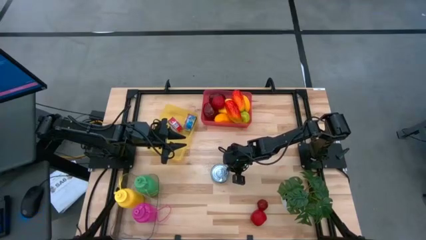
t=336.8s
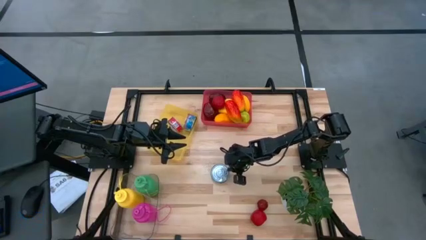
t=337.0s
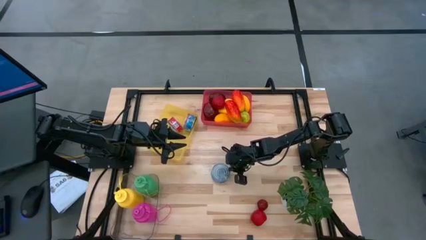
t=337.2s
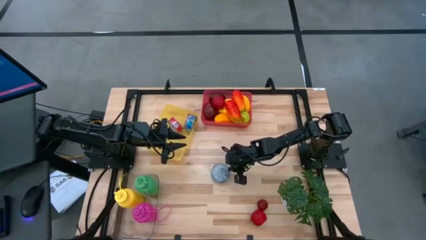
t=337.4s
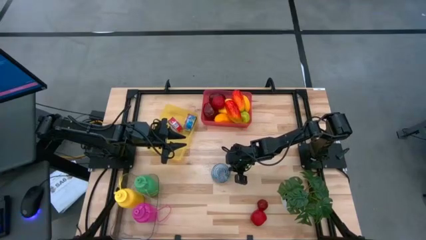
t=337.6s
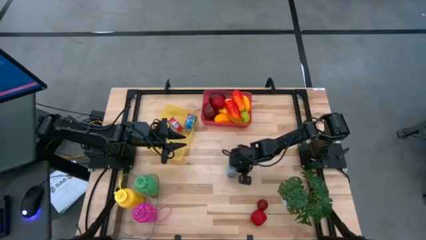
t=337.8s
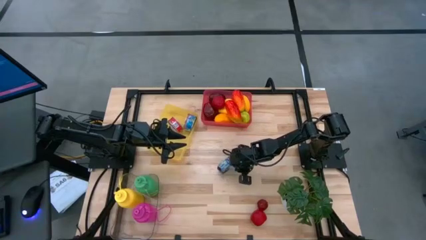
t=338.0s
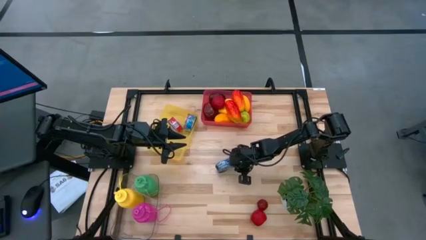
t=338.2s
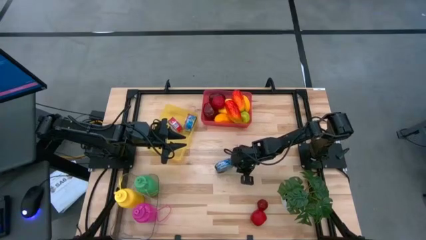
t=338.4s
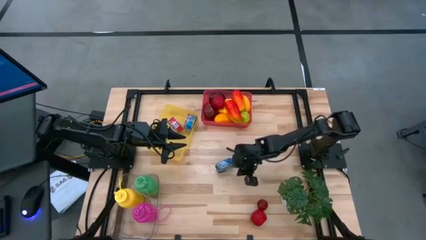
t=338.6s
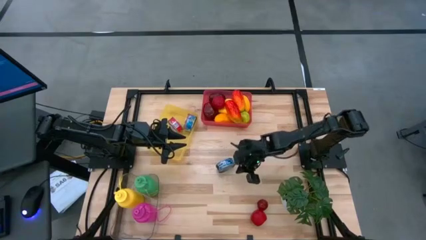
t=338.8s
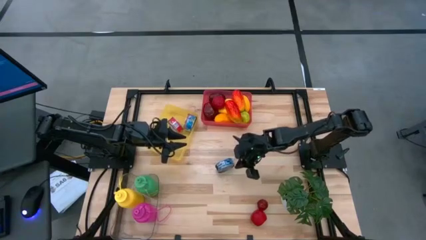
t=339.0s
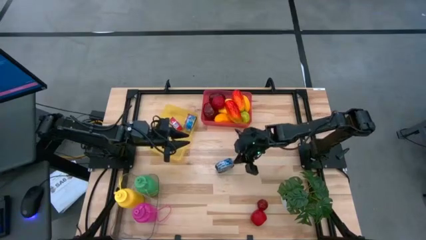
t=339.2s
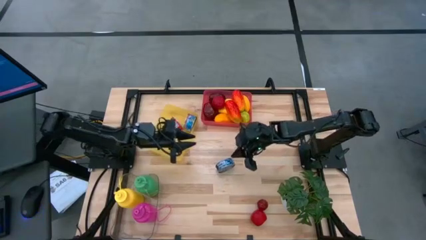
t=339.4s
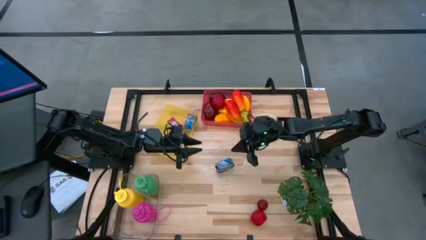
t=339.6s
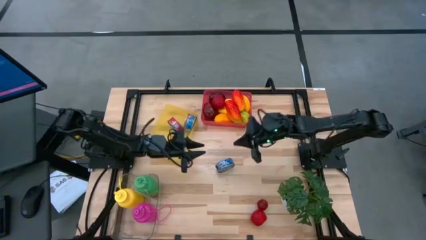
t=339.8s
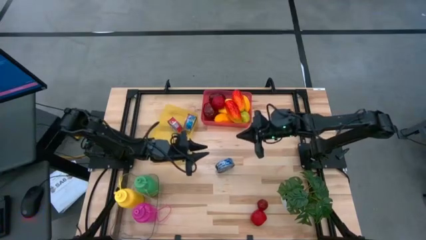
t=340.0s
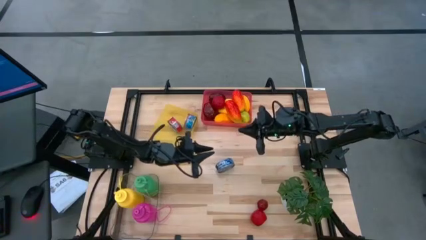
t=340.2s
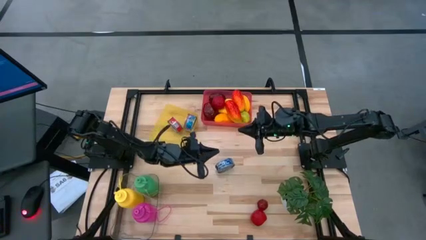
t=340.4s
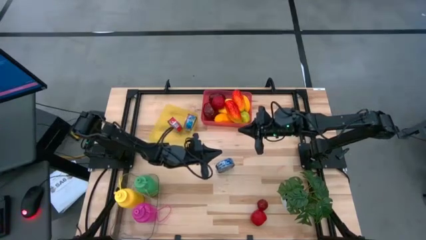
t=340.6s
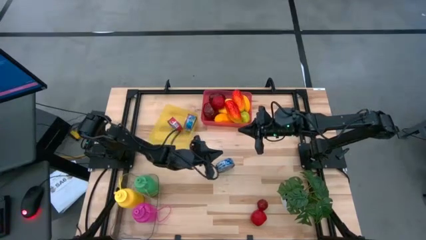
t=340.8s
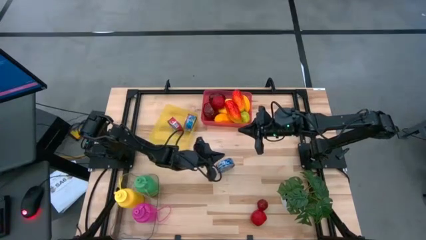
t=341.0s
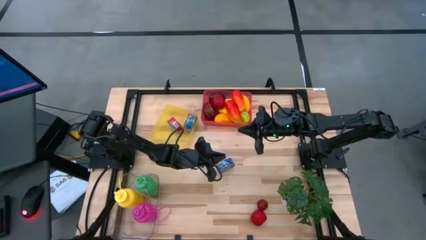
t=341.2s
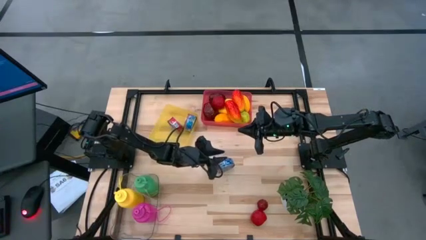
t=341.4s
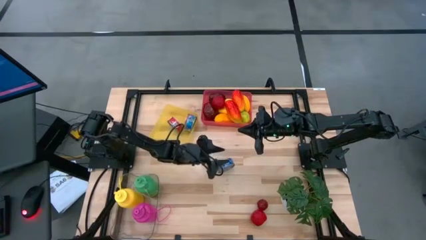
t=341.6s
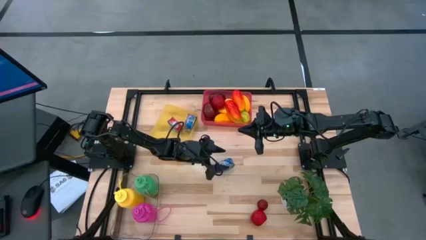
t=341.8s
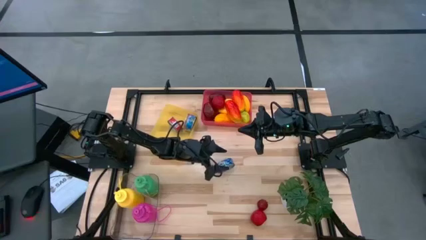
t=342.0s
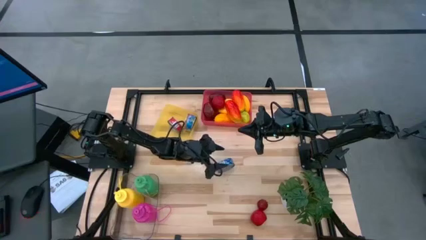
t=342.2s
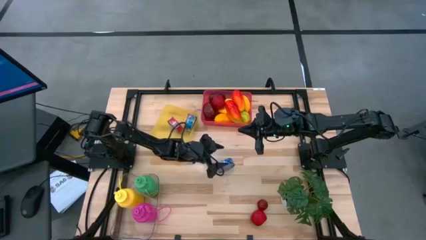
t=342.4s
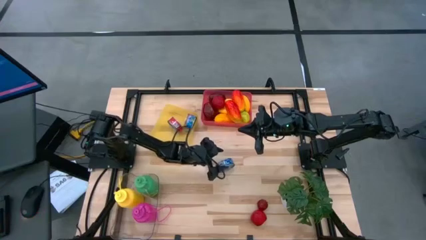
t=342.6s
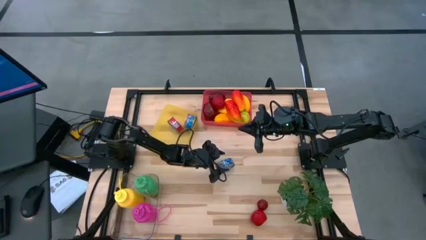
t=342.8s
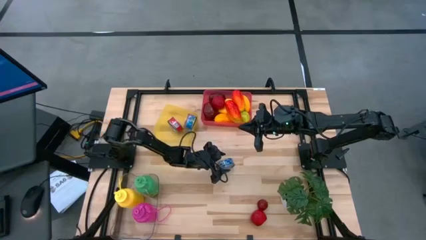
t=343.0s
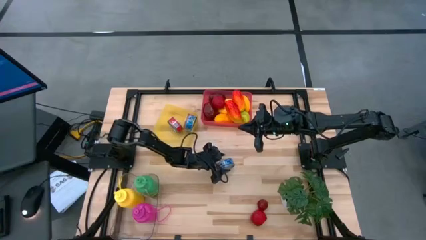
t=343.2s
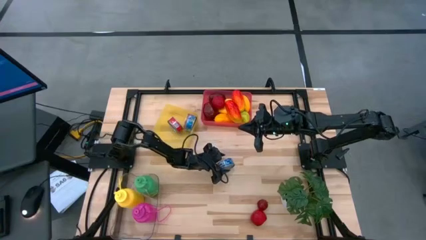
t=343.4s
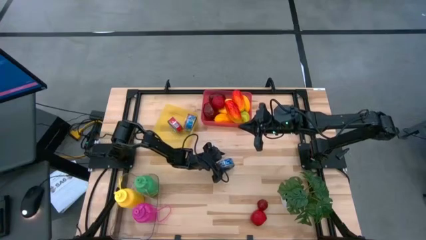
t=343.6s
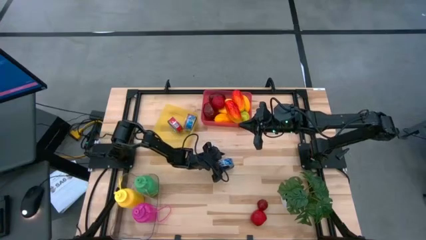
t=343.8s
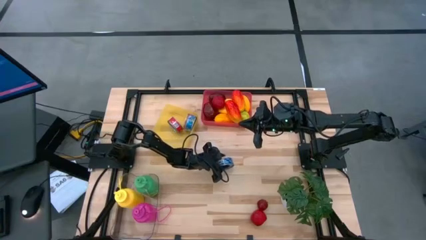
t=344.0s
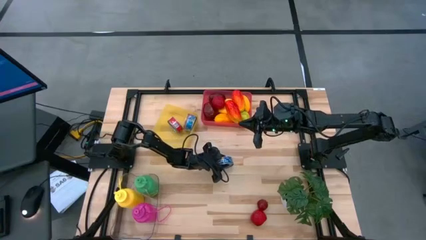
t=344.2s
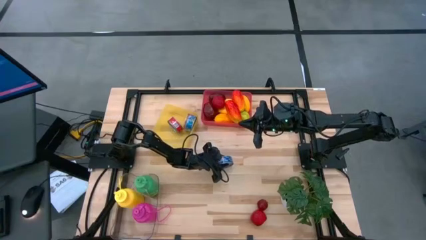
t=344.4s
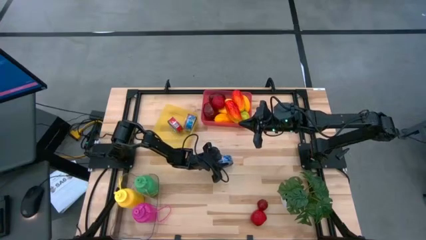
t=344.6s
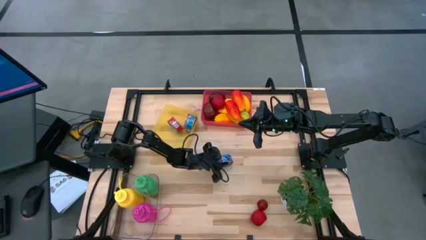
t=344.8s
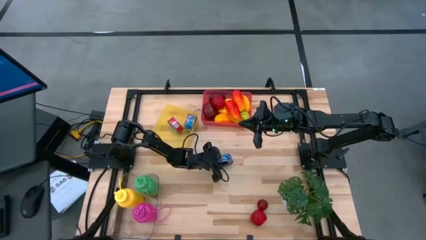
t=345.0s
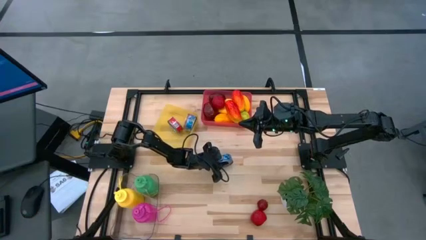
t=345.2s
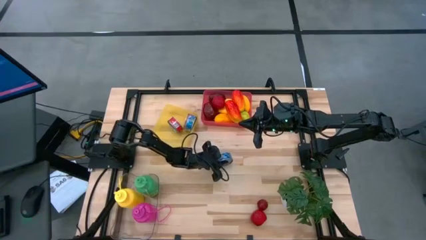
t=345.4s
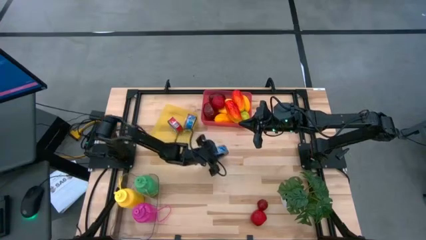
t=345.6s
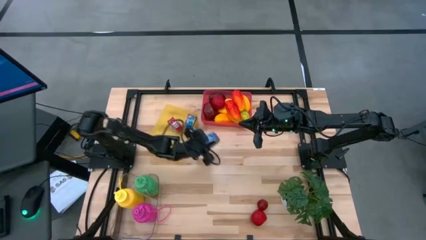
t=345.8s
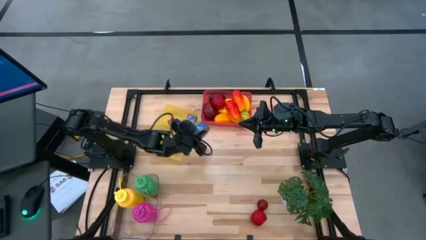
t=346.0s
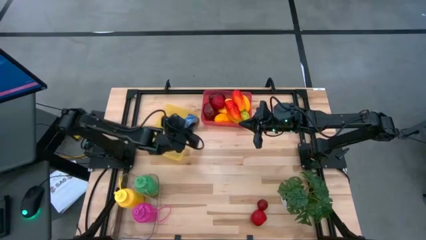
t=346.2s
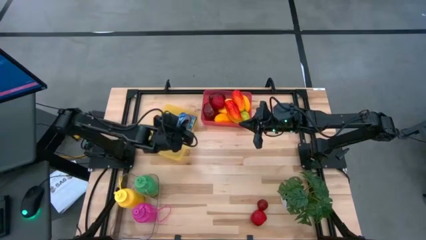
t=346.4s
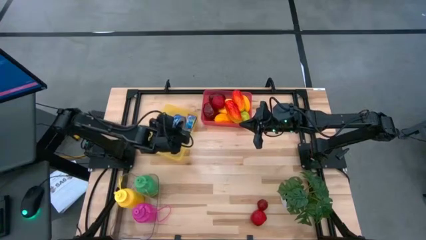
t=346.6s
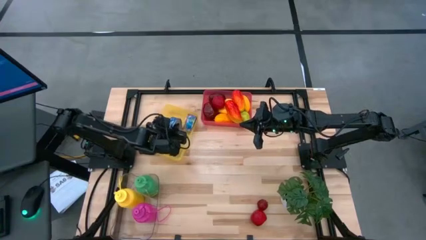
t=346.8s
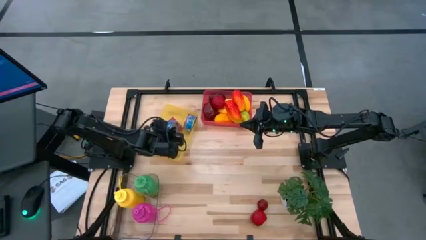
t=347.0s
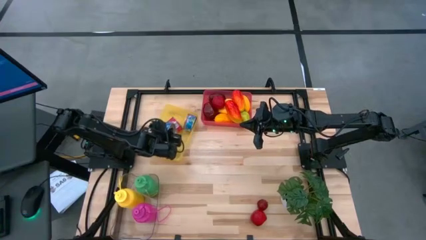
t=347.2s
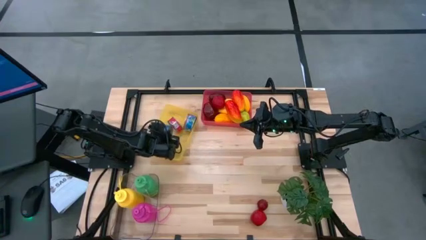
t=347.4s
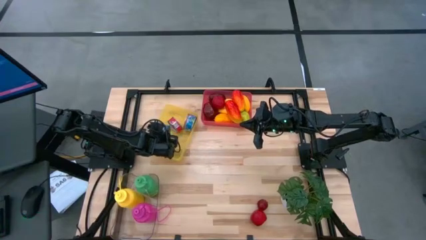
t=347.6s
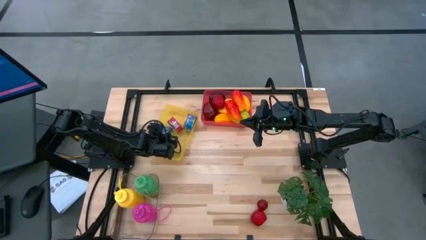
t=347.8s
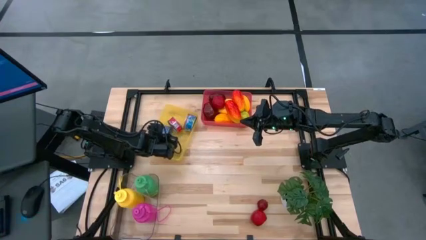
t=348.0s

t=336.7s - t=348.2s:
Task: Pick & Place Food Item
Put the blue tuna can into the yellow bin
